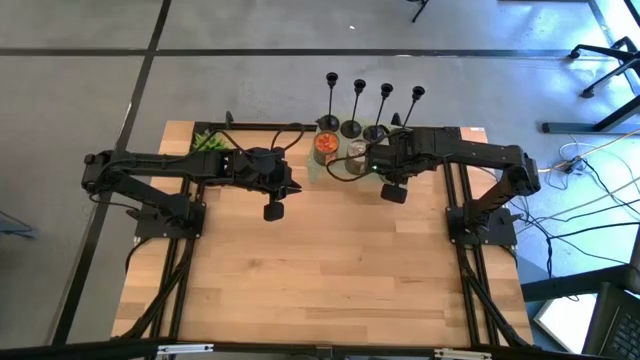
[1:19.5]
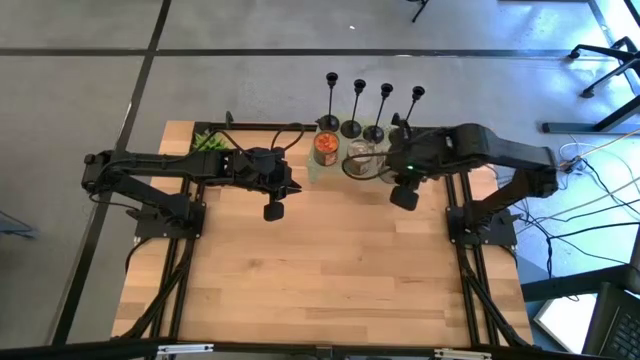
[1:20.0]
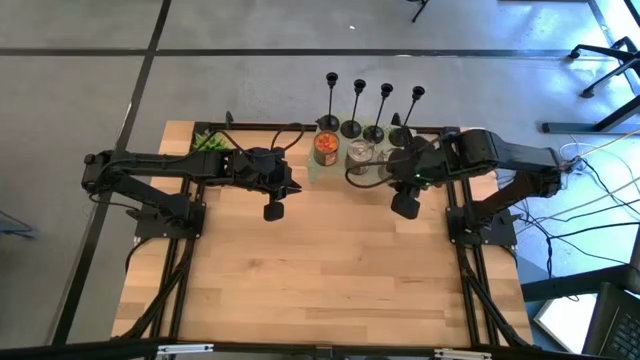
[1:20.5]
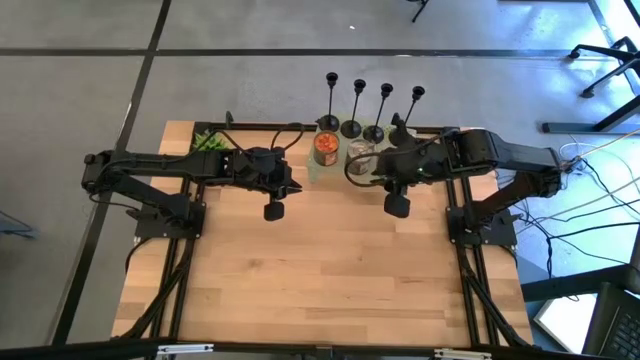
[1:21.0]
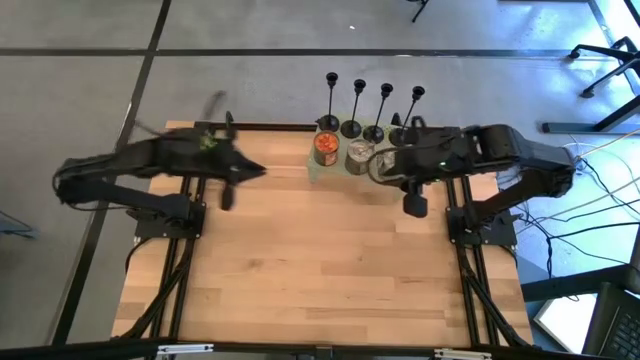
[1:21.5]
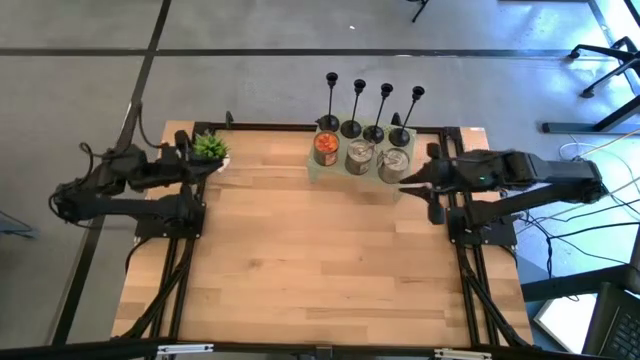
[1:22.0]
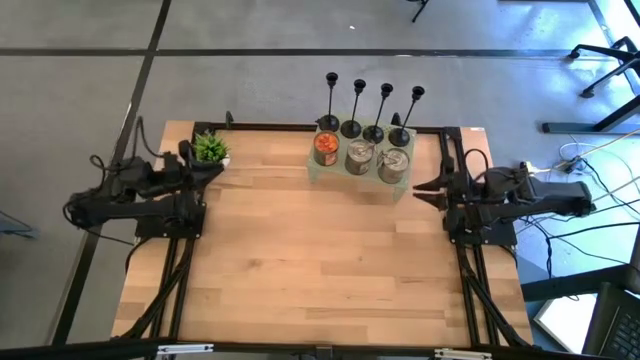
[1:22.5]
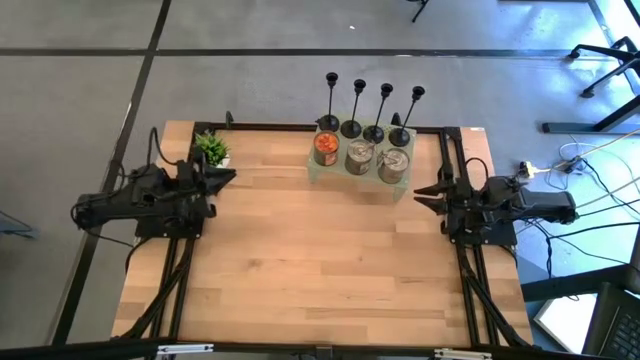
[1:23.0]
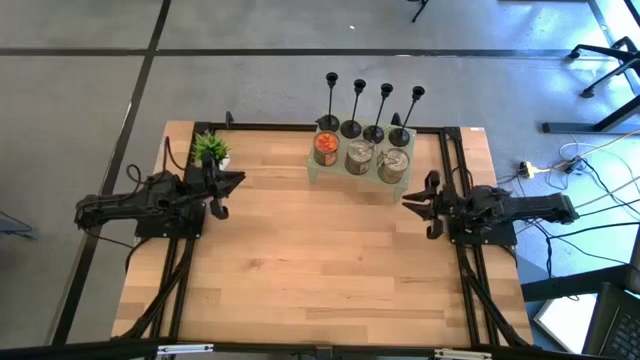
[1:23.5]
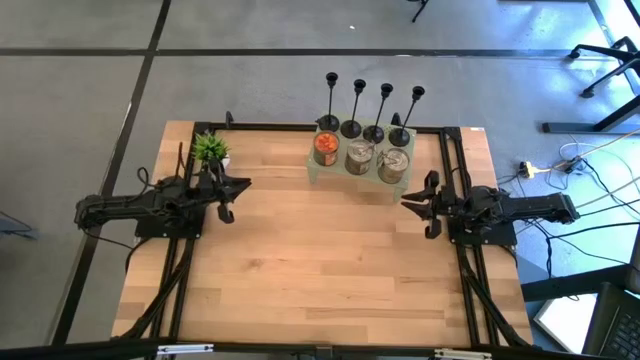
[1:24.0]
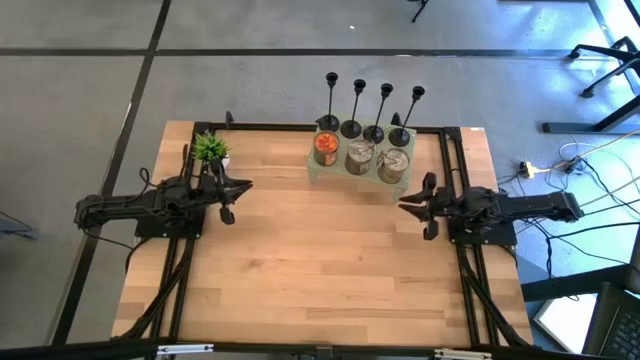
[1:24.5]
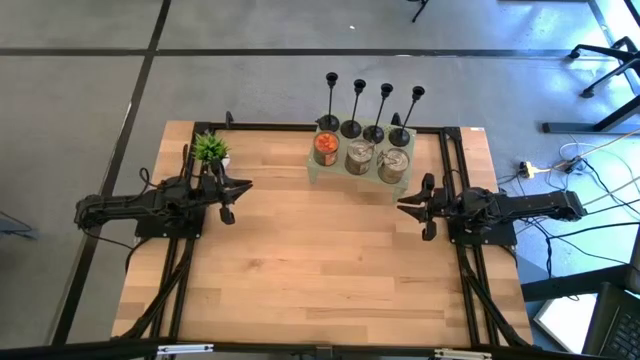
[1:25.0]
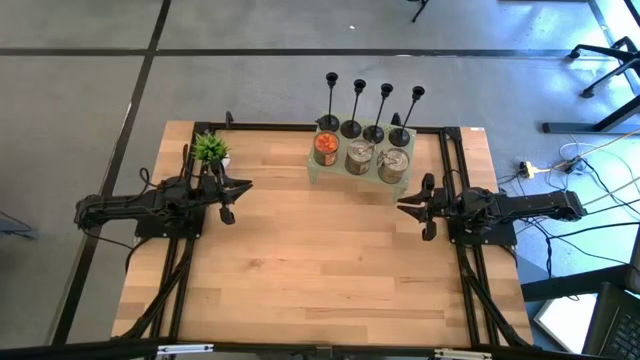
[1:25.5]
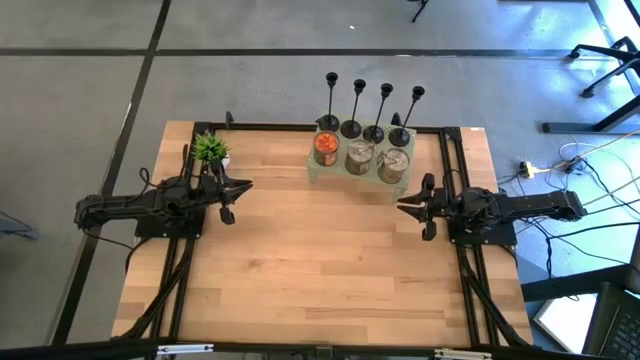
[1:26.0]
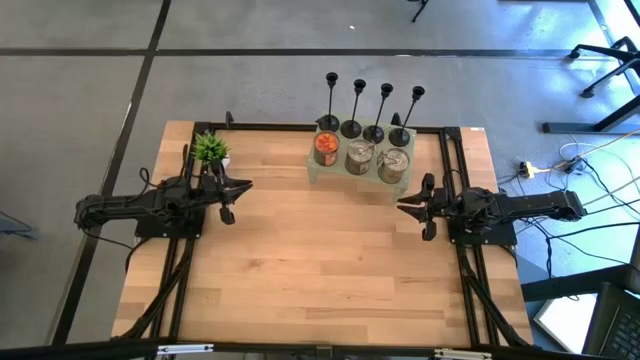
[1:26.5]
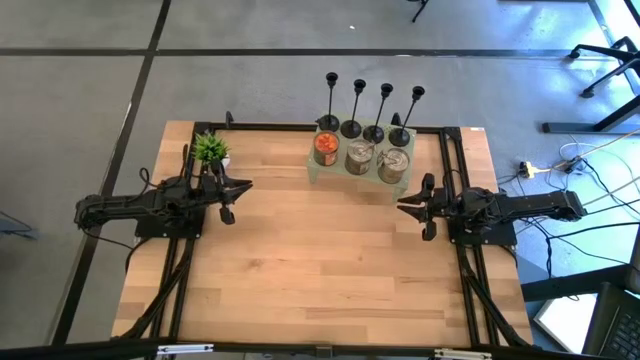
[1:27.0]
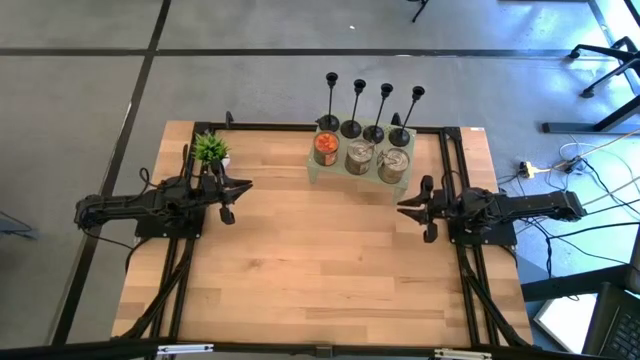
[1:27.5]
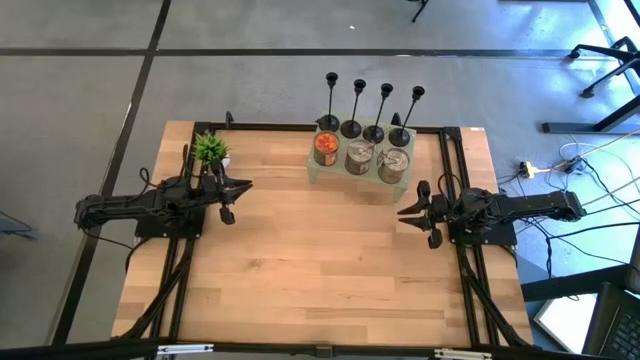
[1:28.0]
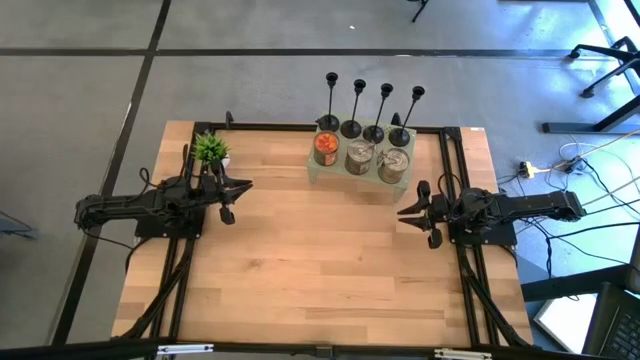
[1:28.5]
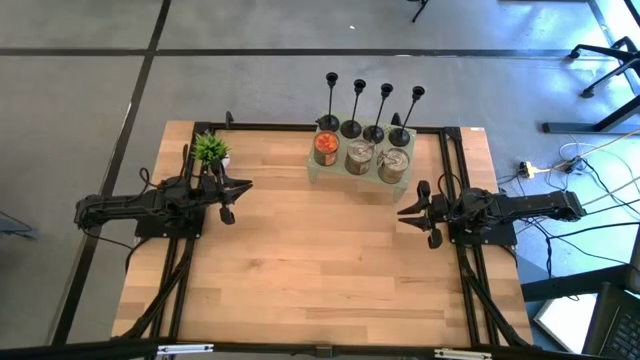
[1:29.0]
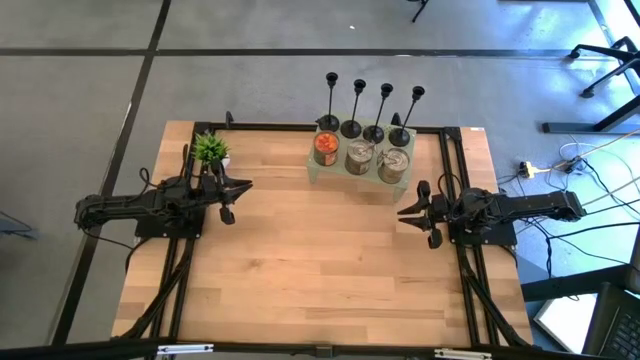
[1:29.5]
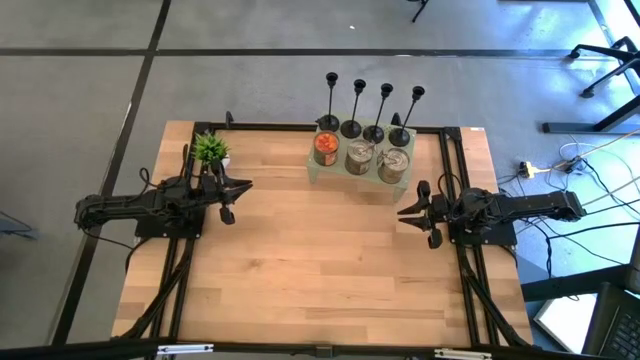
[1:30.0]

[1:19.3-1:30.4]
Task: Pick & Place candle stick holders
Return to Home Position

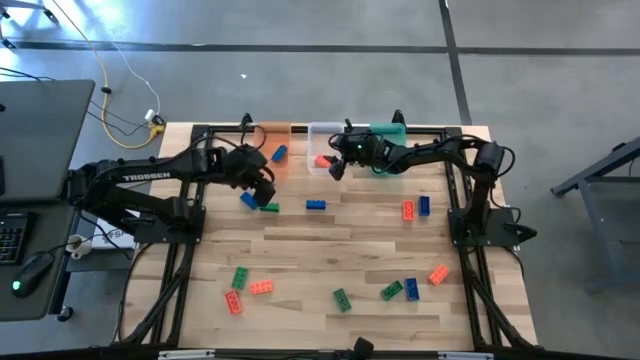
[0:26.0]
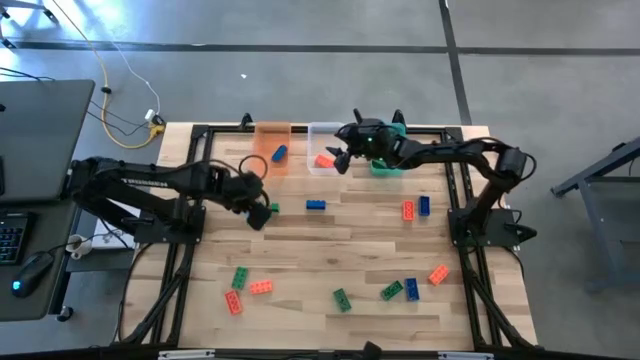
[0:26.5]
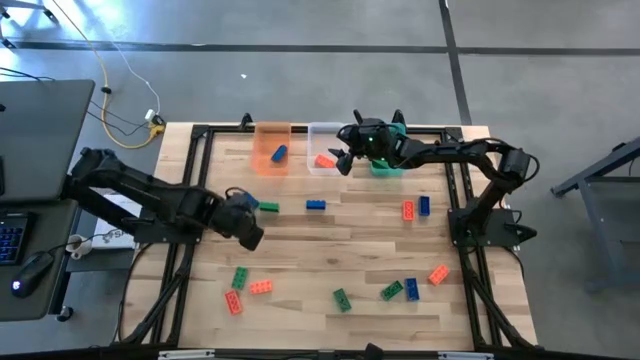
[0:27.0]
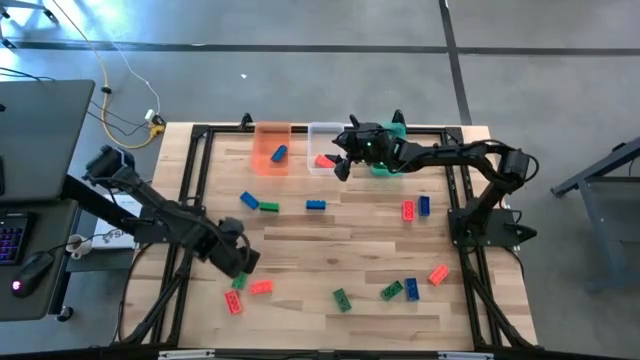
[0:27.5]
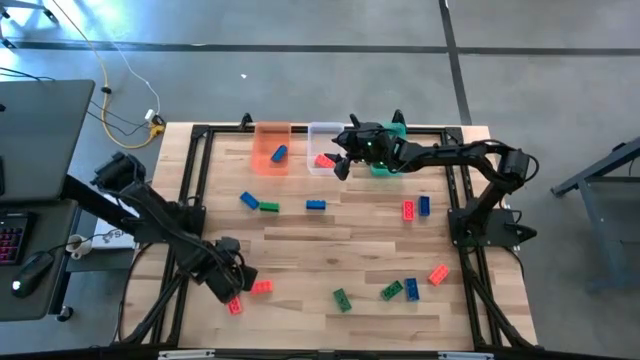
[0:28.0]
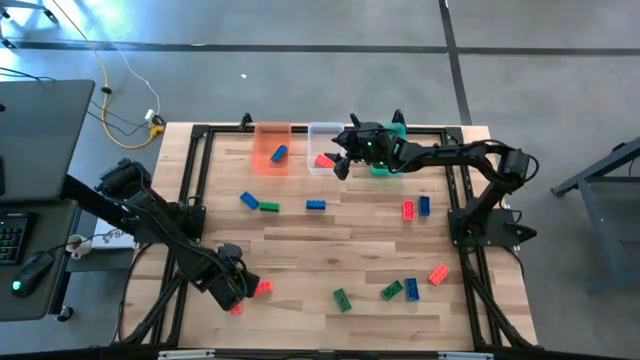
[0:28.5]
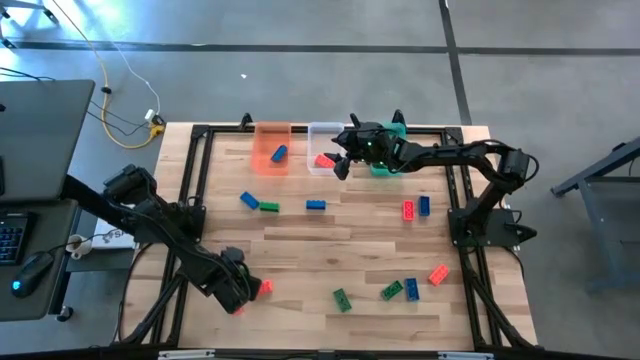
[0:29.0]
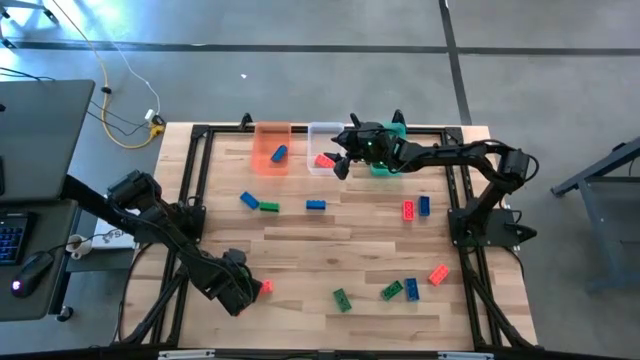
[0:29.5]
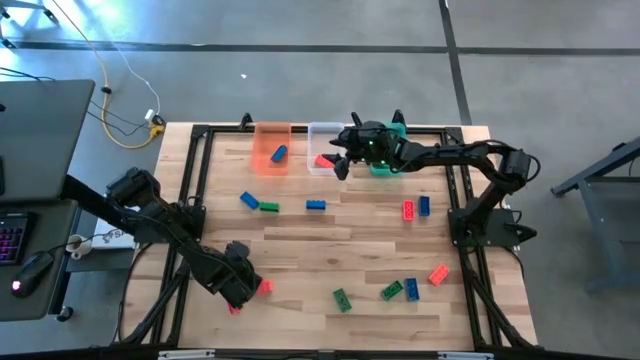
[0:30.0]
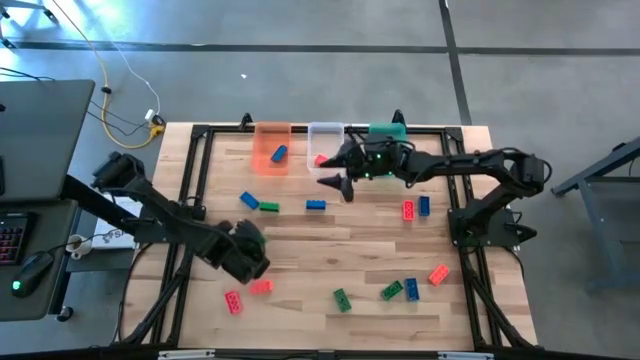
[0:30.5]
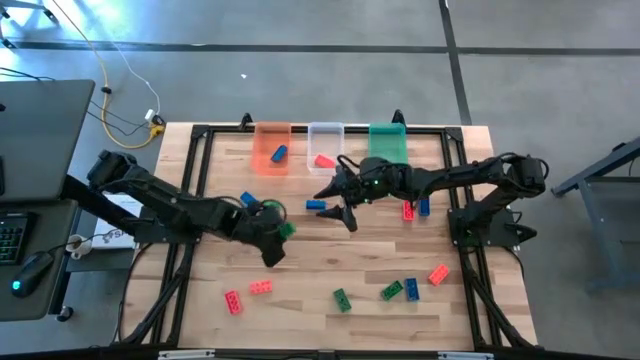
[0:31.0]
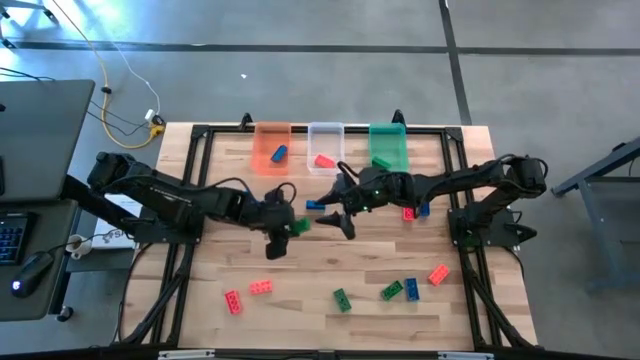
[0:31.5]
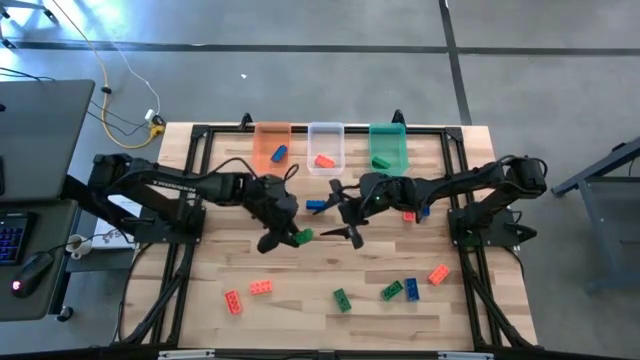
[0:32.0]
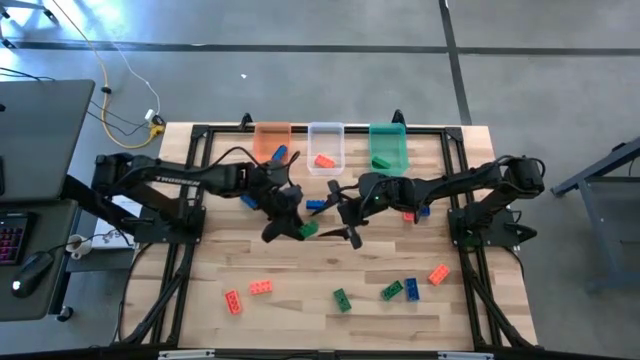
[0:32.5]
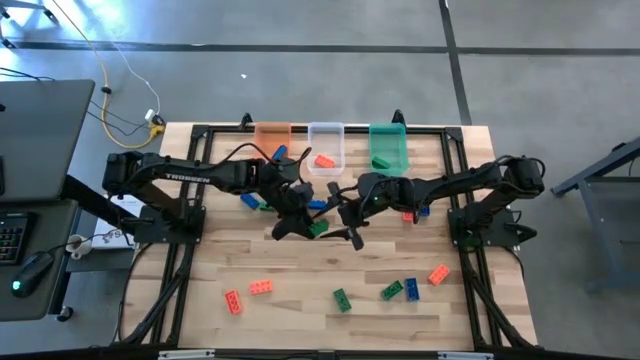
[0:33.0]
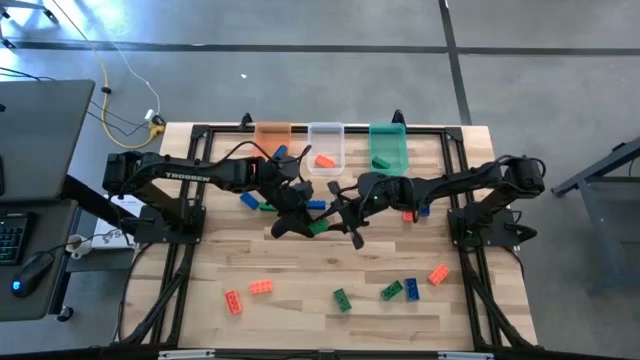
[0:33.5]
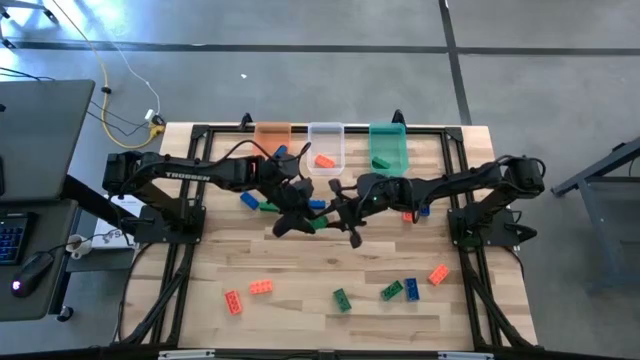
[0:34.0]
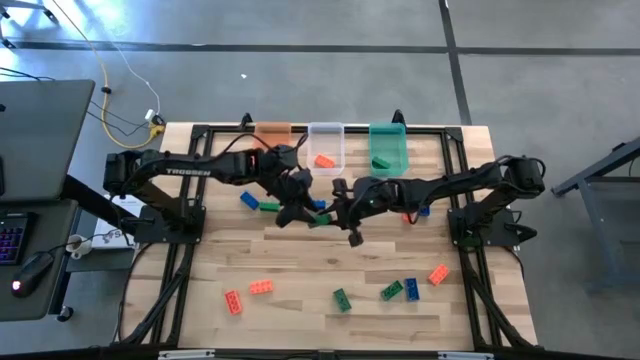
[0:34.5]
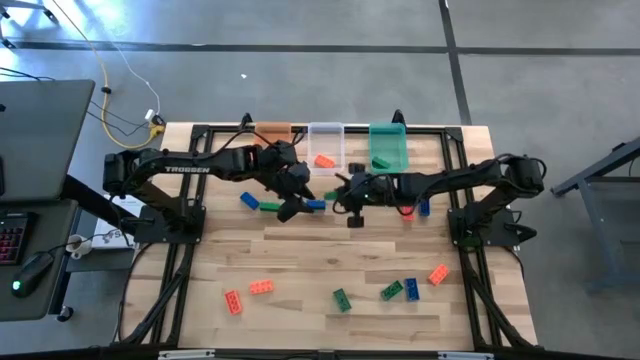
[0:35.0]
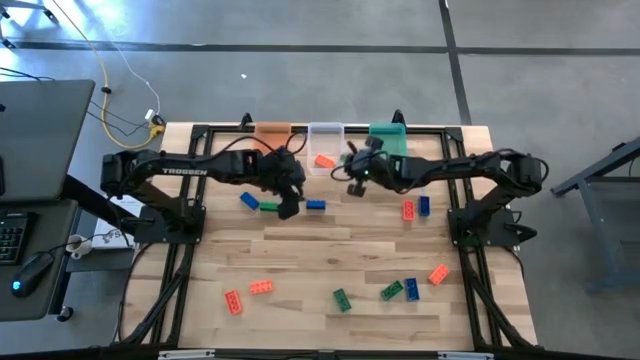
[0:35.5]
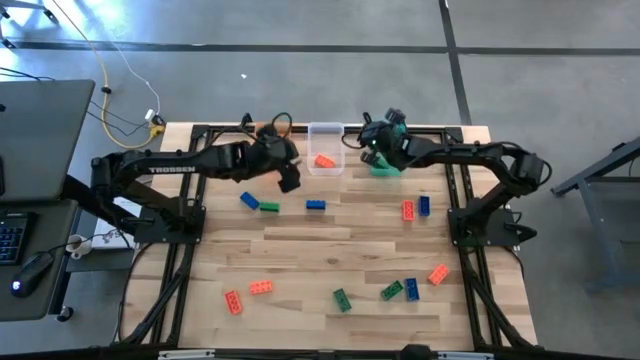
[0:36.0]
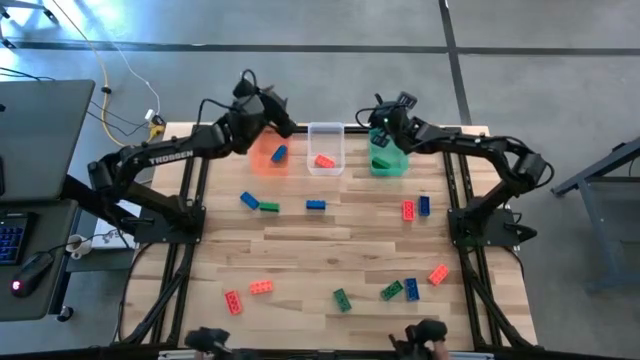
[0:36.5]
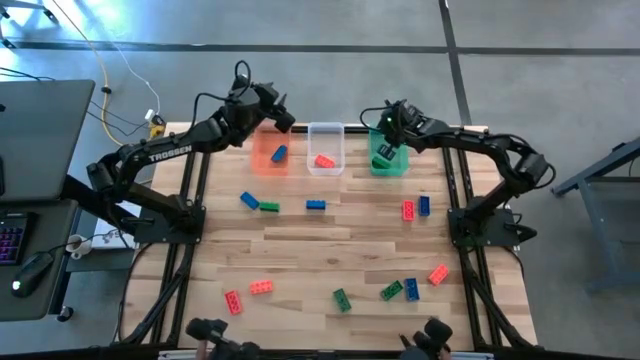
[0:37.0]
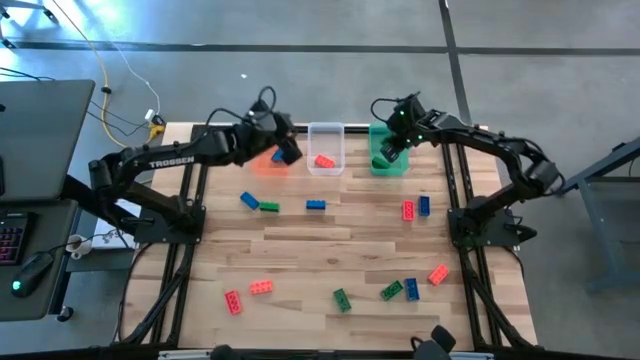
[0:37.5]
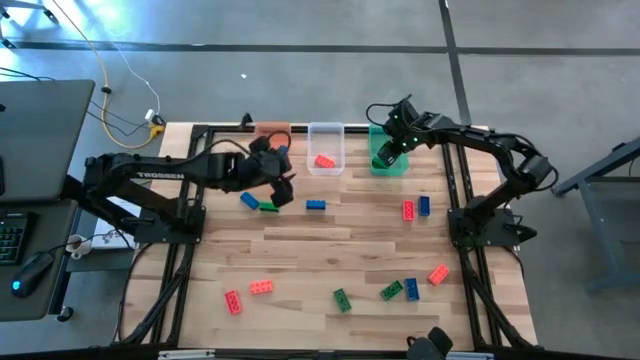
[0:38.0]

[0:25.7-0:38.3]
Task: Sort & place blocks by color
Put the green game piece into the green bin
